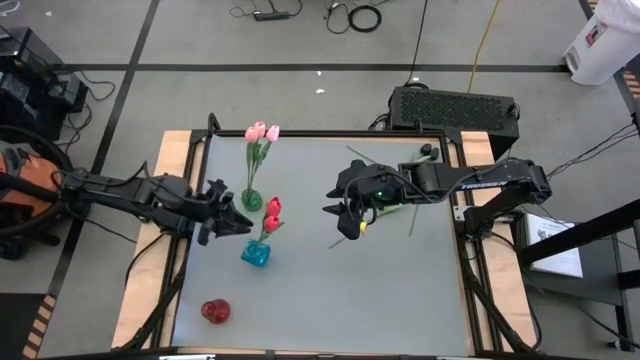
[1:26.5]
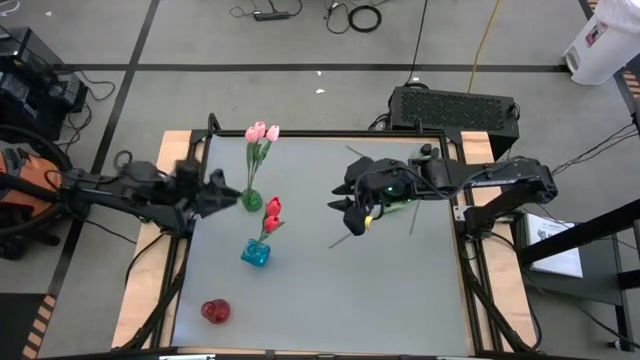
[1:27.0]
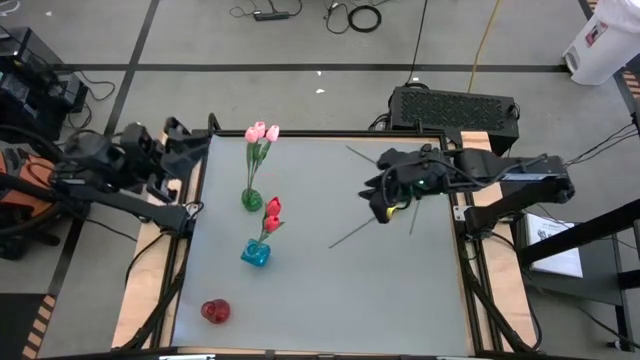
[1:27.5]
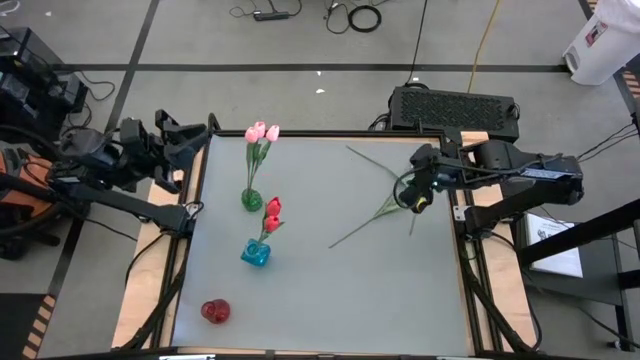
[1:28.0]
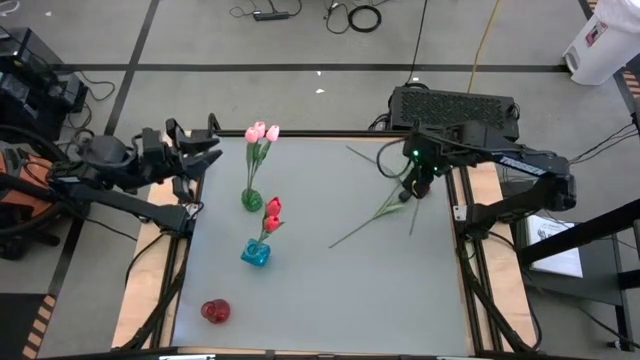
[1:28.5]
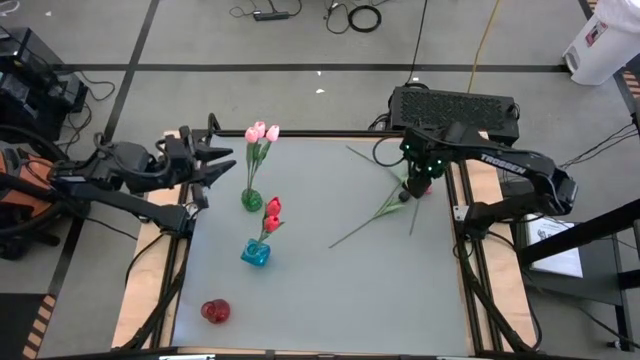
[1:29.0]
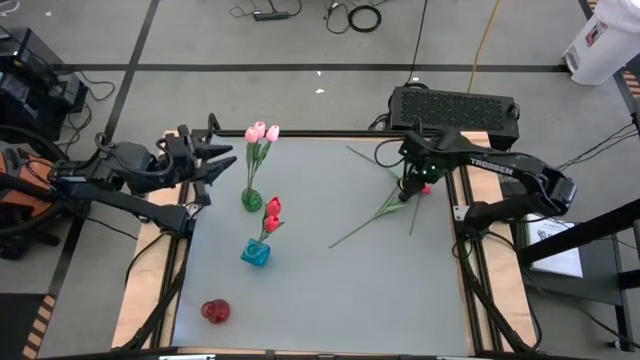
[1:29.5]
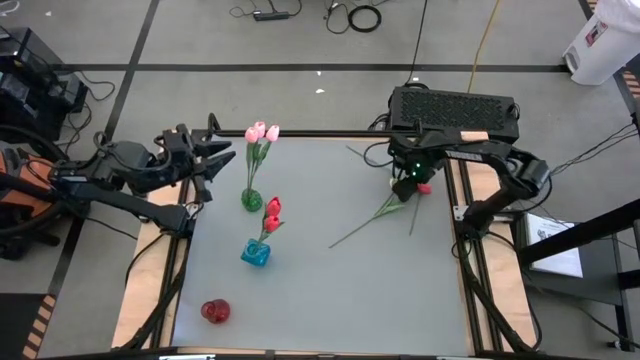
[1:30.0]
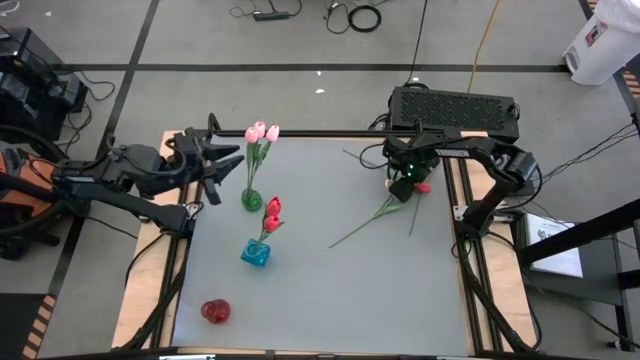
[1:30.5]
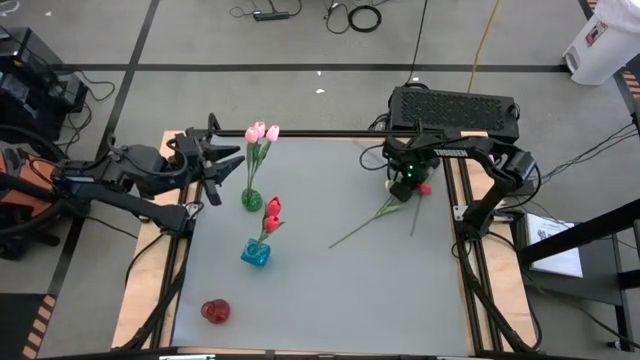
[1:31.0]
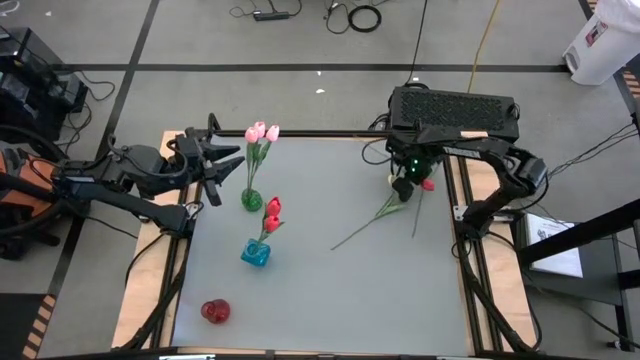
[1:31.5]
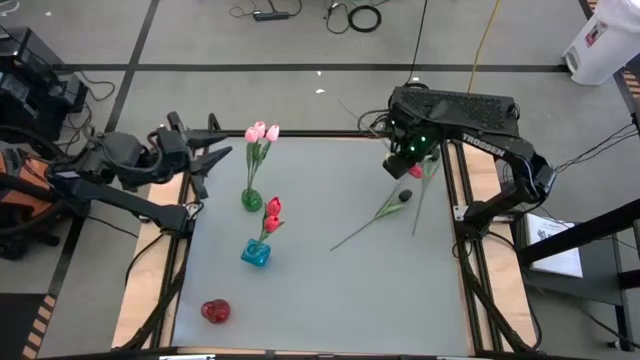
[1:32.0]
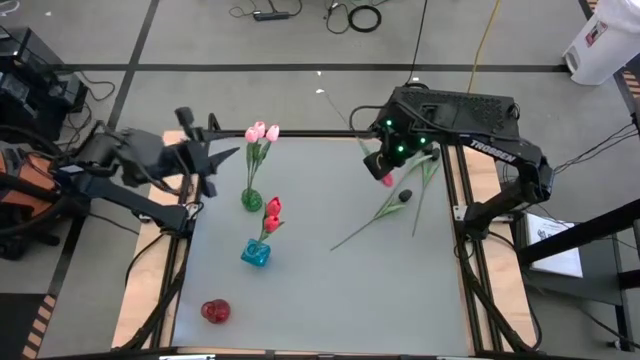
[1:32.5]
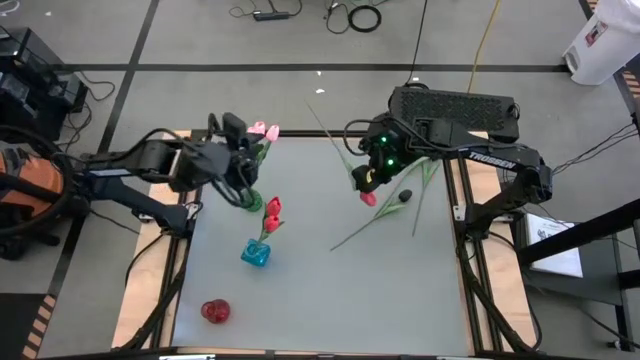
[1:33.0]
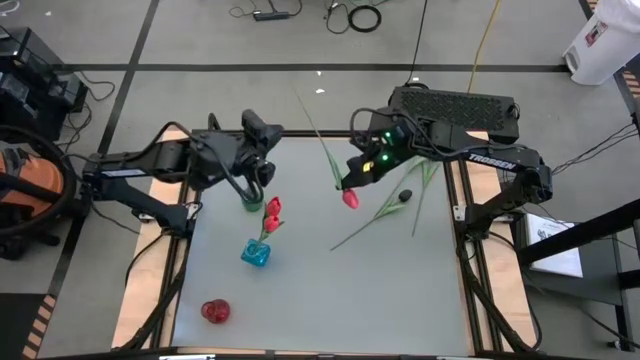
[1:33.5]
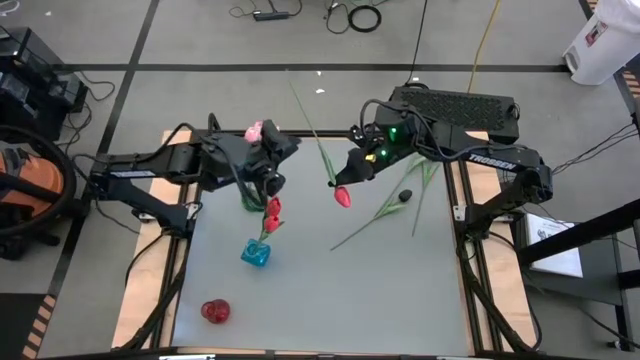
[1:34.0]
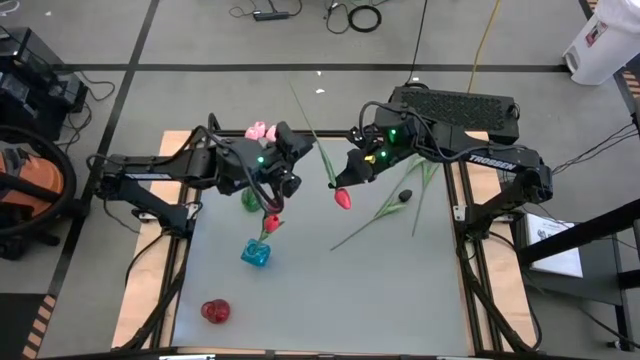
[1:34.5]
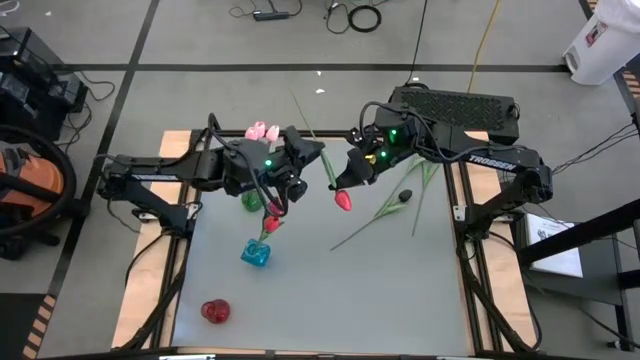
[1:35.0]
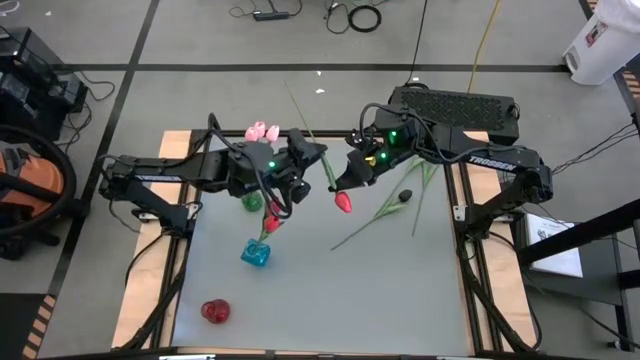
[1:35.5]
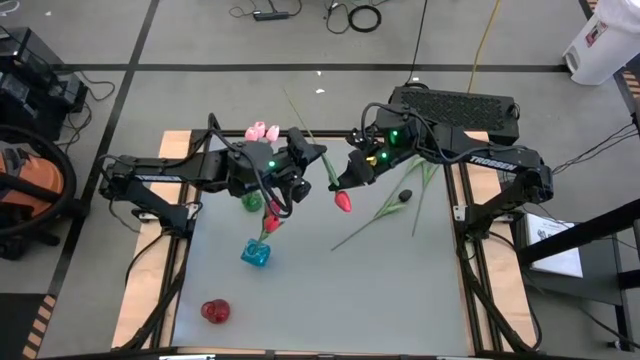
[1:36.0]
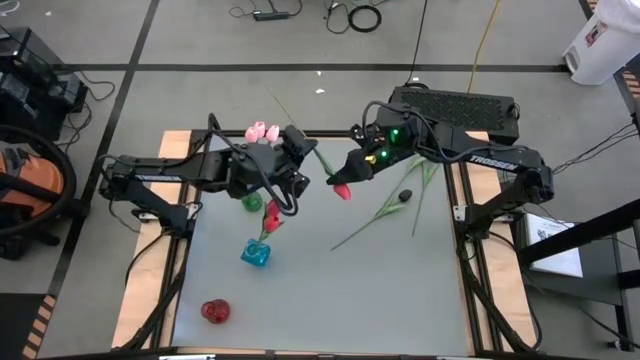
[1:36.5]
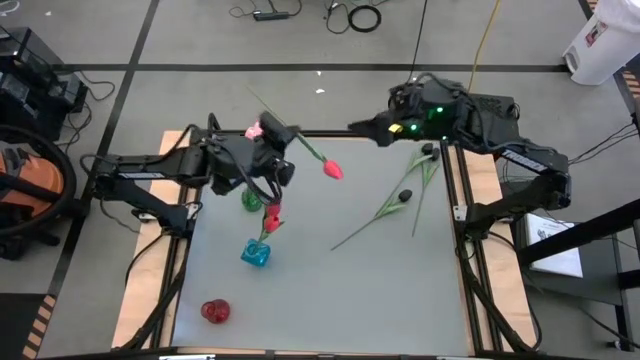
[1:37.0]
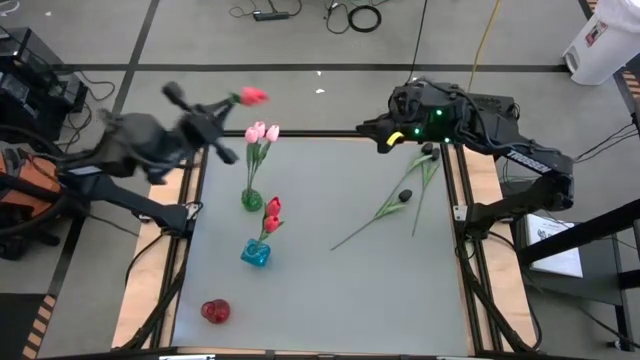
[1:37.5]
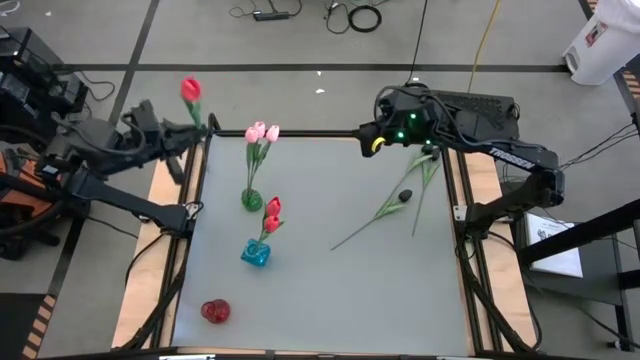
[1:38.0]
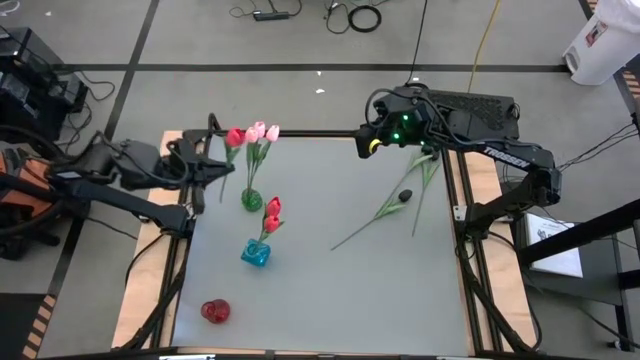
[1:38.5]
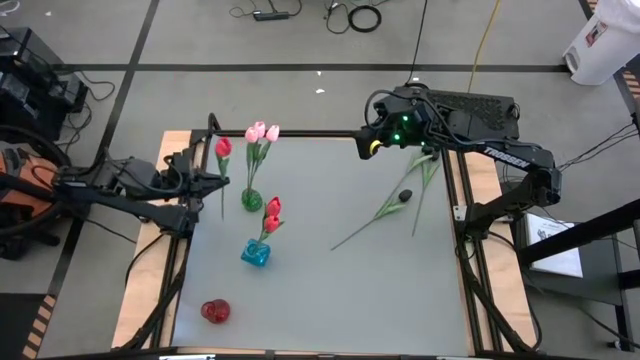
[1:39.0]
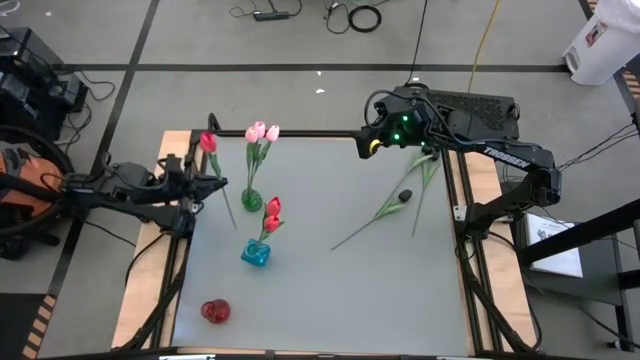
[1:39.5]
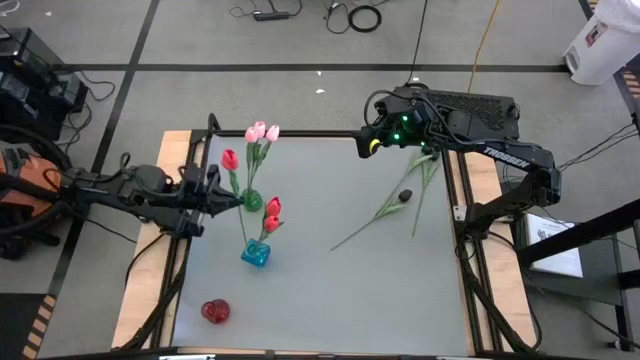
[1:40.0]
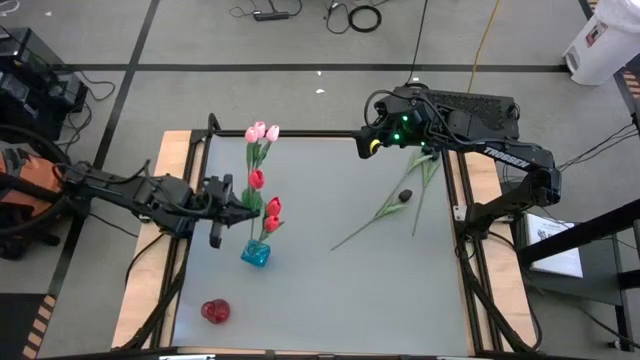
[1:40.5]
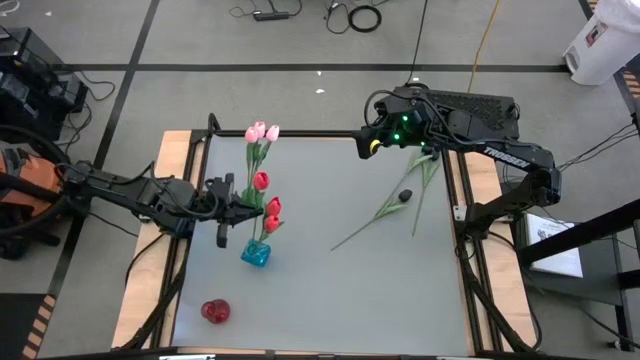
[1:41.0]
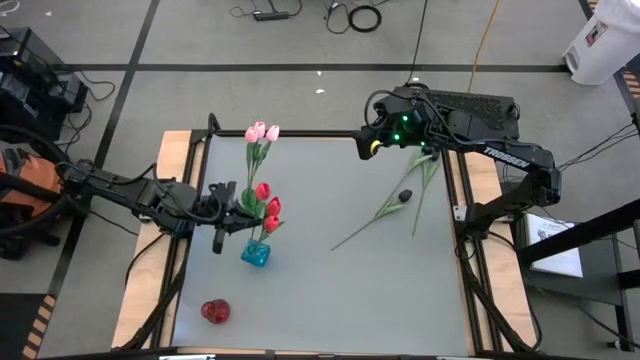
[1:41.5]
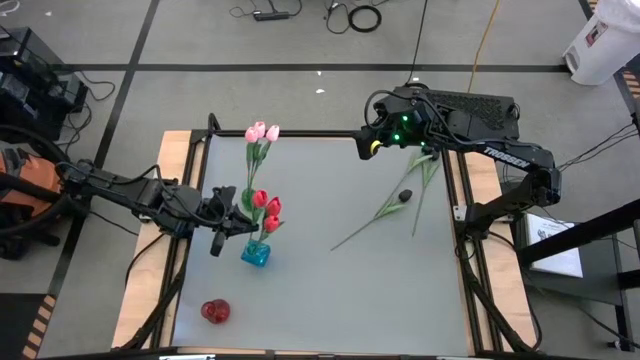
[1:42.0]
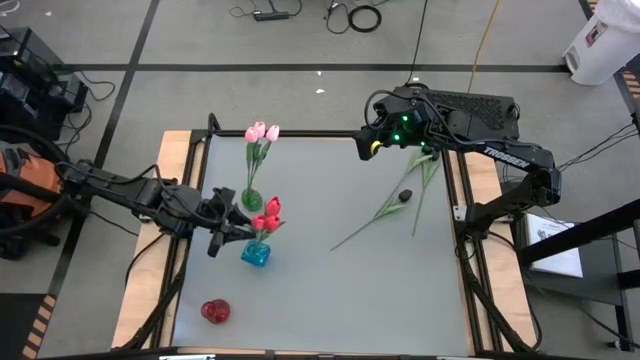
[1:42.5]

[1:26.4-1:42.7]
Task: Sort flowers into vase by color
Put the red flower into the blue vase

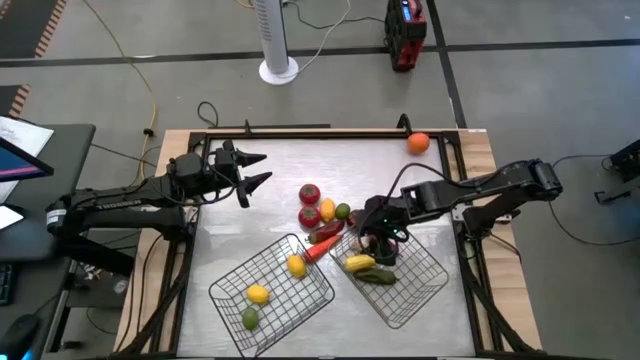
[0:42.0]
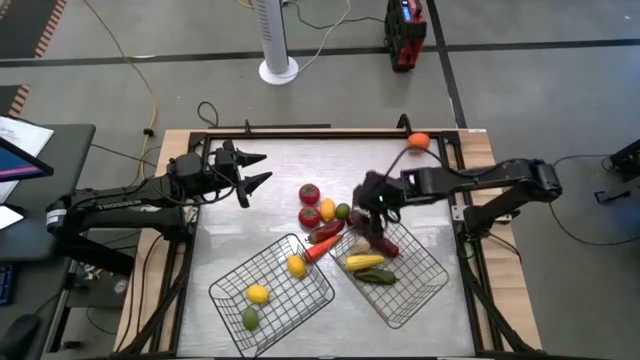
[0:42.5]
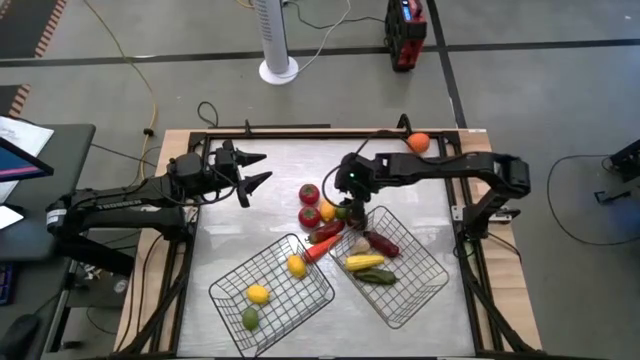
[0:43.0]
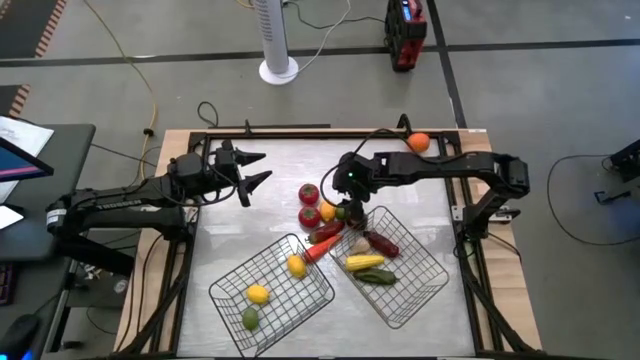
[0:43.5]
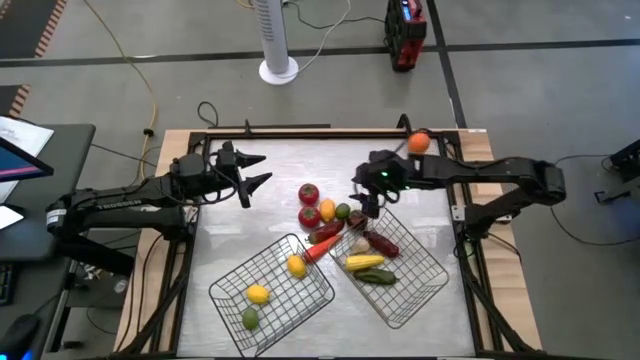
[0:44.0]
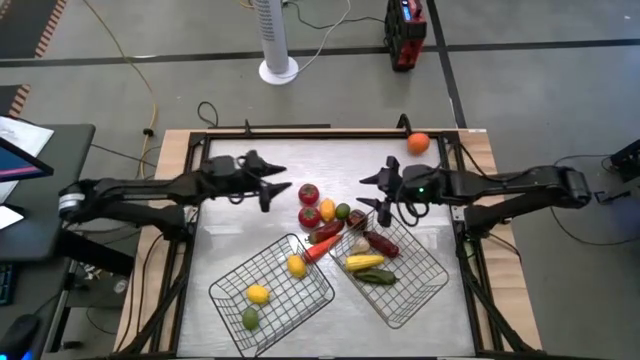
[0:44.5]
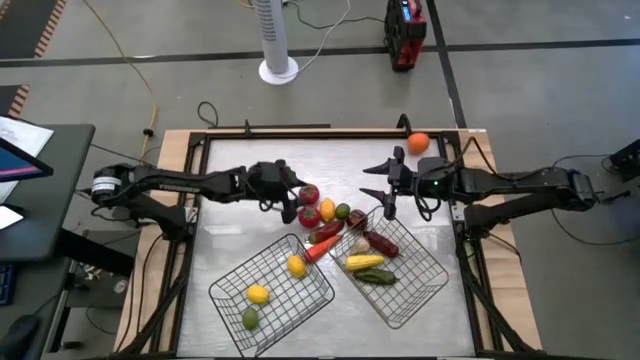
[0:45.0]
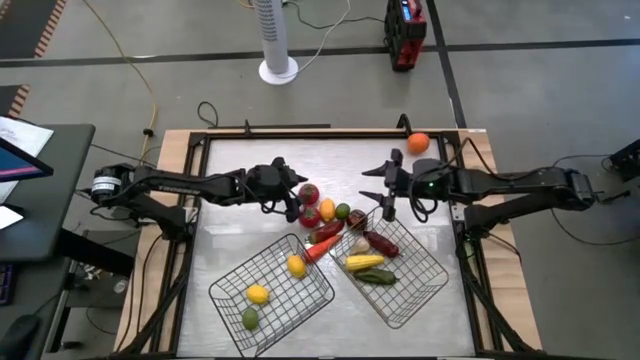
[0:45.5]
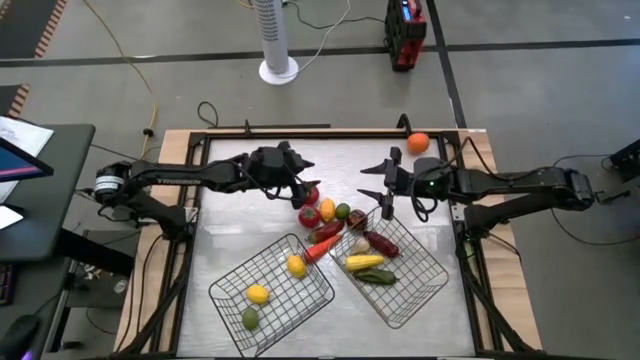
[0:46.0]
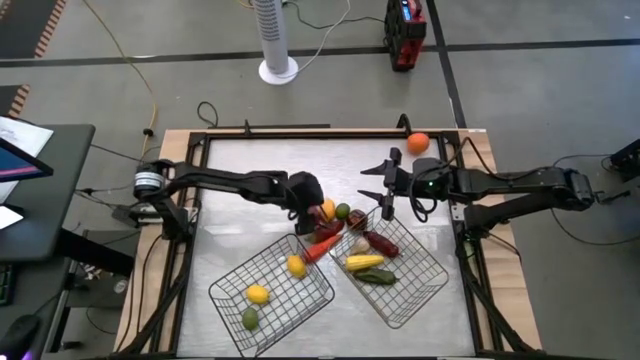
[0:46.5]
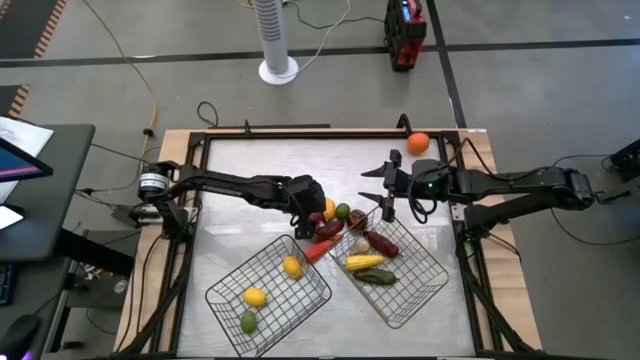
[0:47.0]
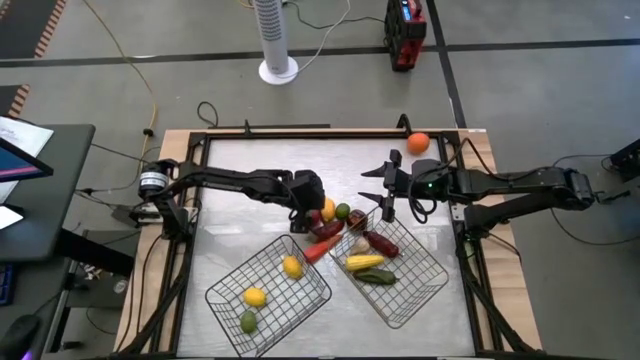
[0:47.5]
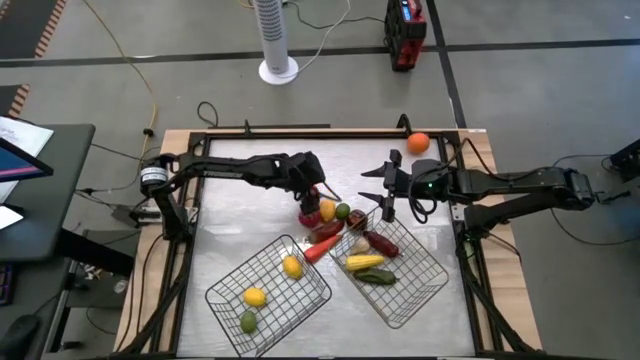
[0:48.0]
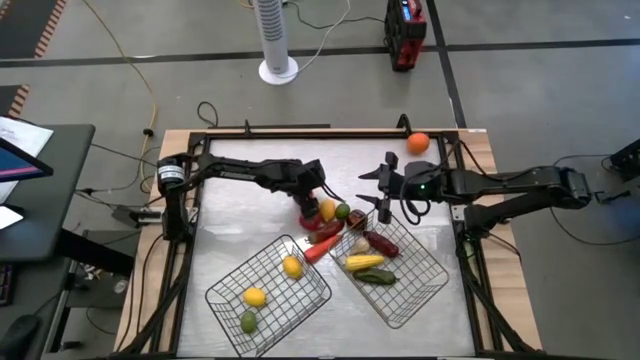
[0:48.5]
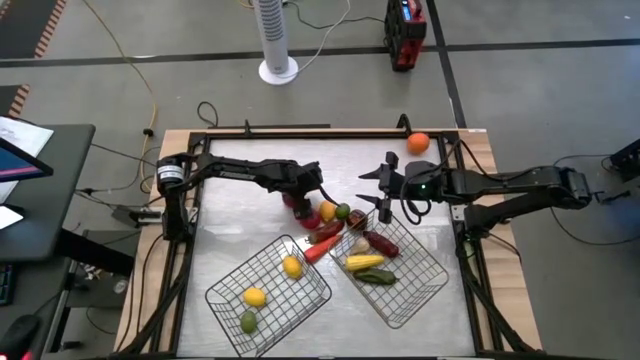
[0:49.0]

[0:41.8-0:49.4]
Task: Sort produce into baskets
Put the top red tomato into the black wire basket
